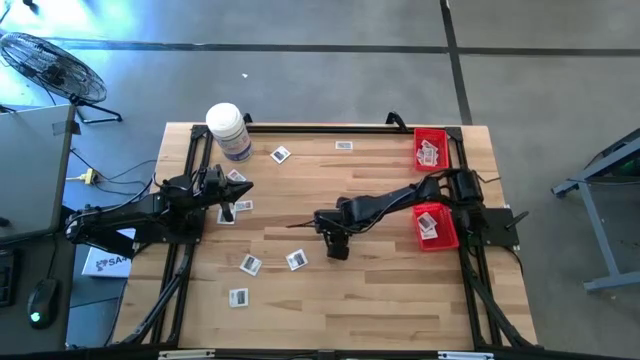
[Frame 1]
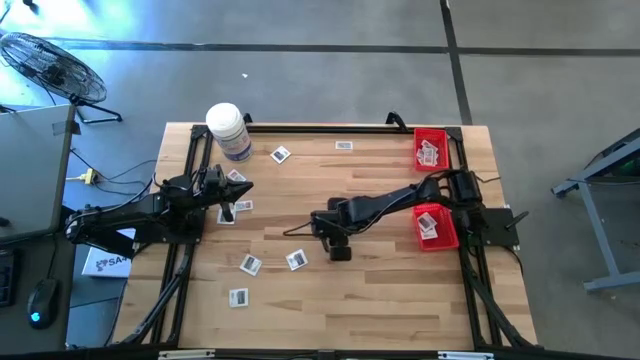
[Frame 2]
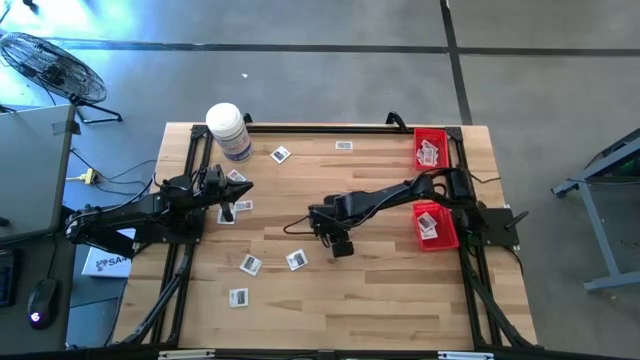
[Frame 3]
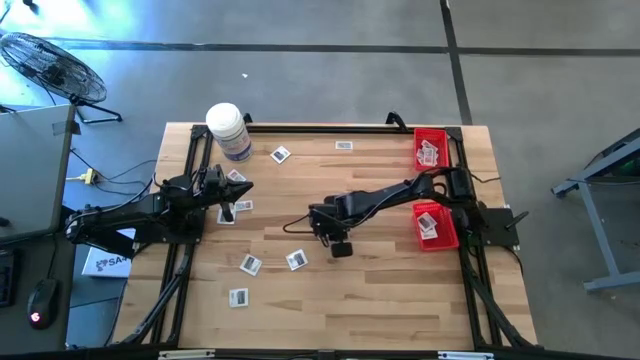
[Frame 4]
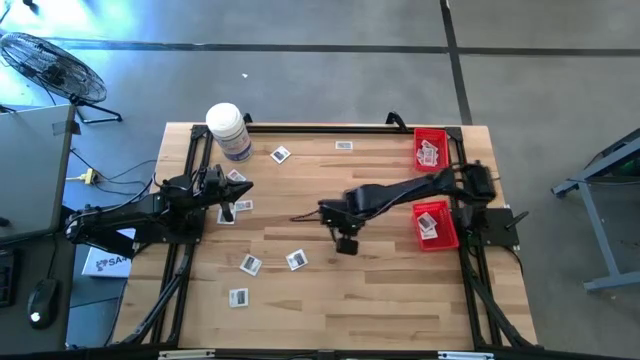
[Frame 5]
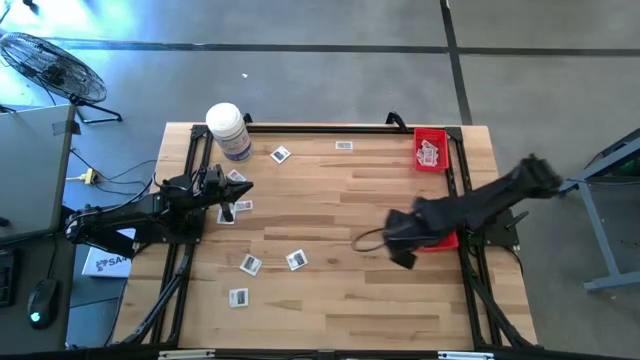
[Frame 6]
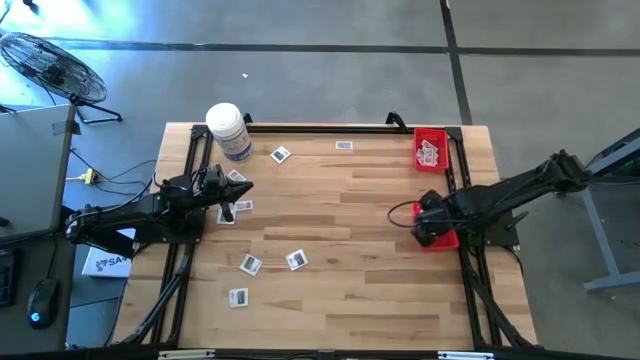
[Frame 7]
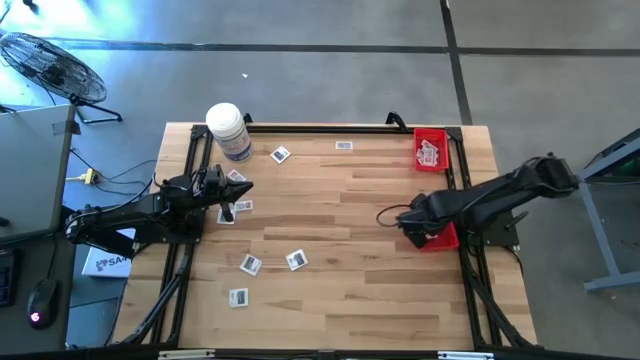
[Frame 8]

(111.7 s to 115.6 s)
Task: Pick & Place First Aid Supplies
Put the towelette pack into the bottom basket

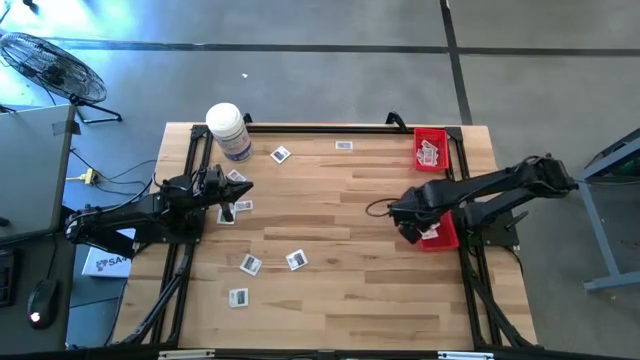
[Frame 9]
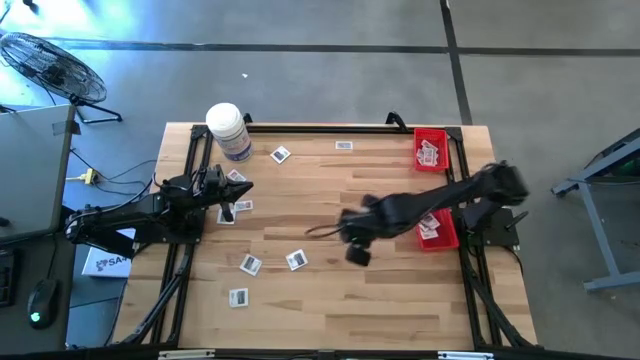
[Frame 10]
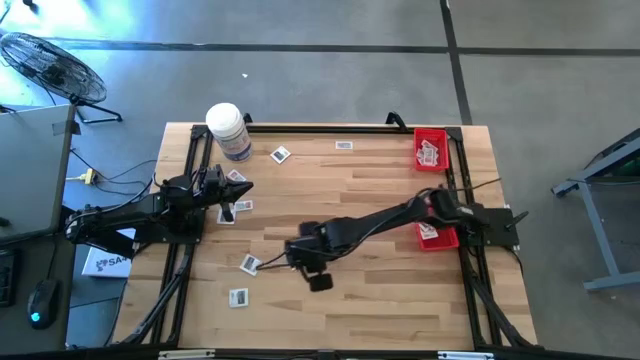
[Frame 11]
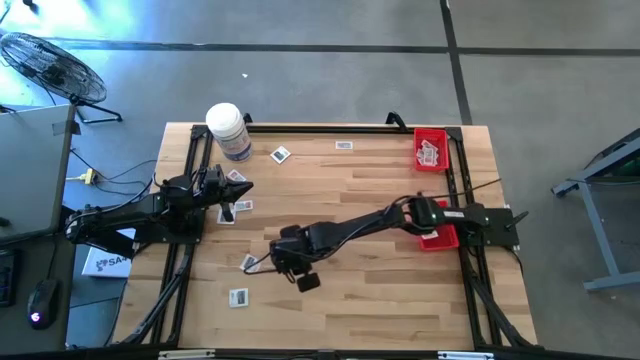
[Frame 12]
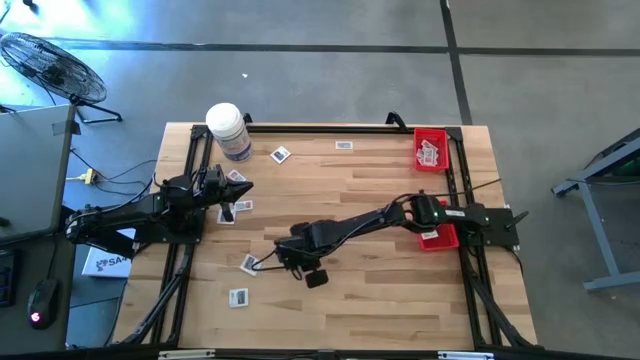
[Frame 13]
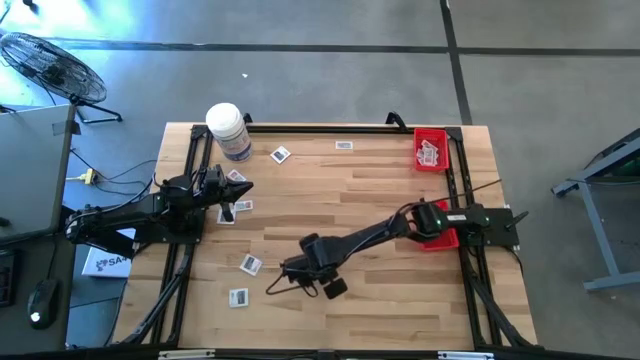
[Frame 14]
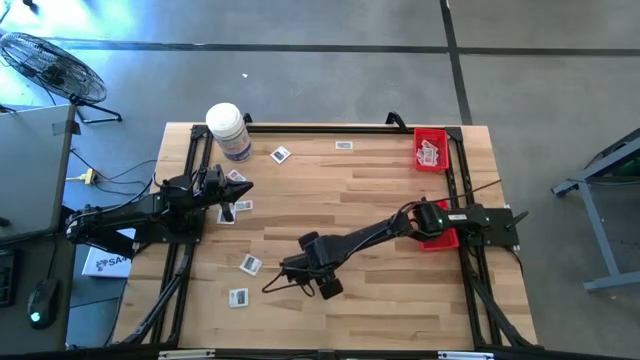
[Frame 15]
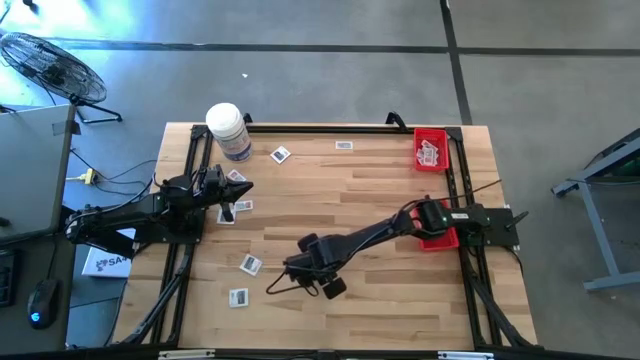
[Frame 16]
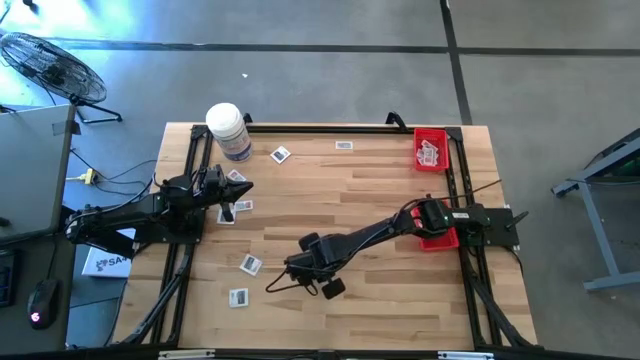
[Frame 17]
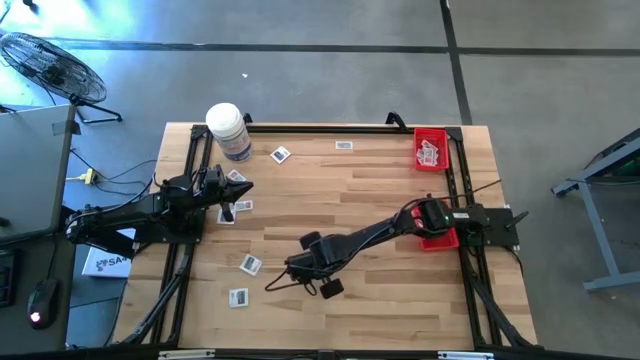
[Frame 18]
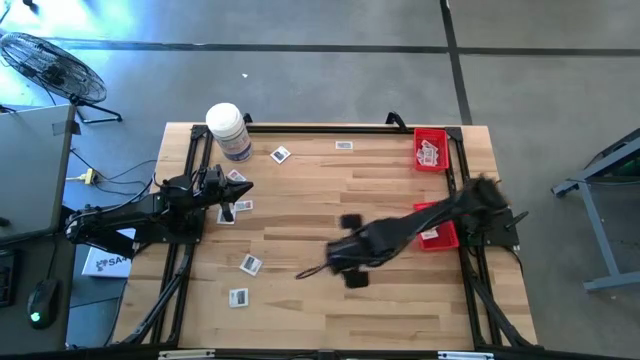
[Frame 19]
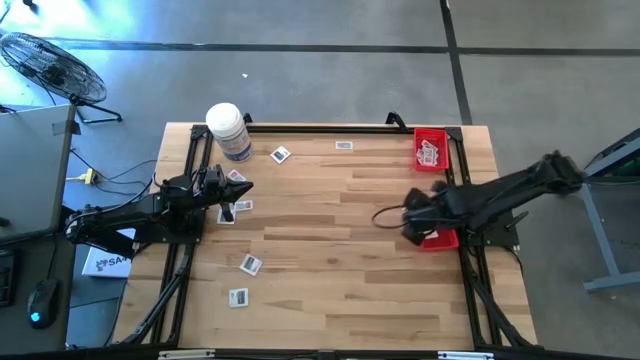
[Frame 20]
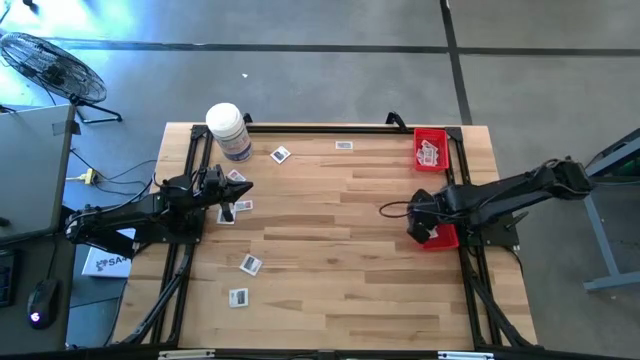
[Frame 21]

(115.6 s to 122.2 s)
Put the towelette pack into the bottom basket

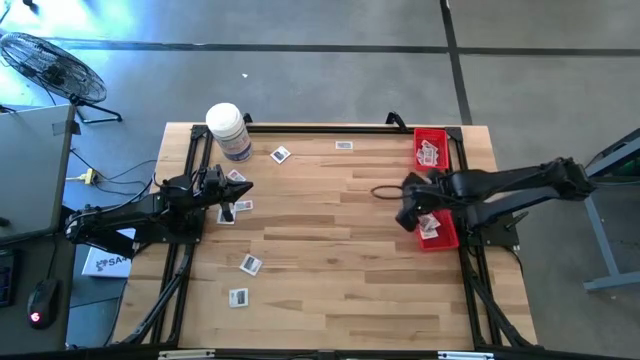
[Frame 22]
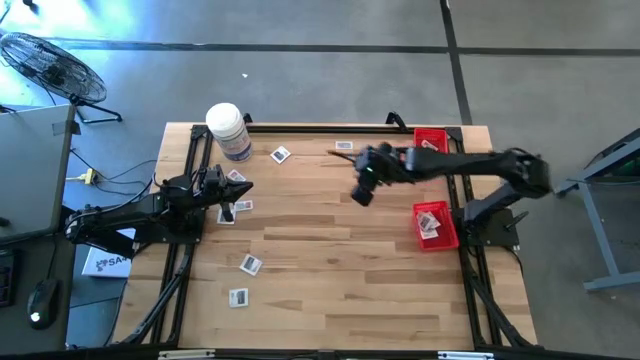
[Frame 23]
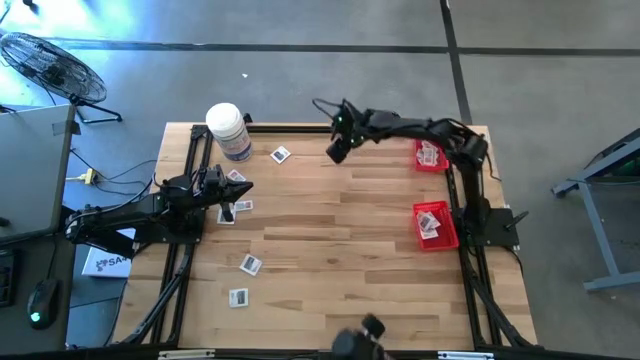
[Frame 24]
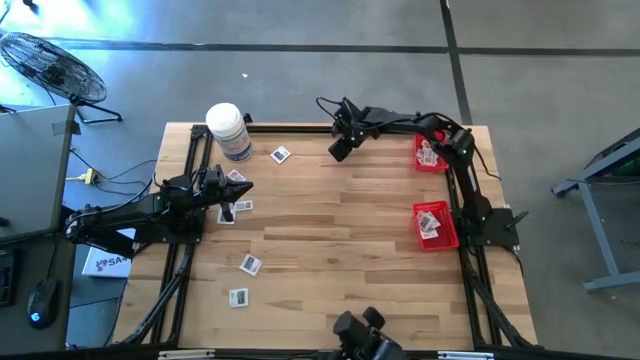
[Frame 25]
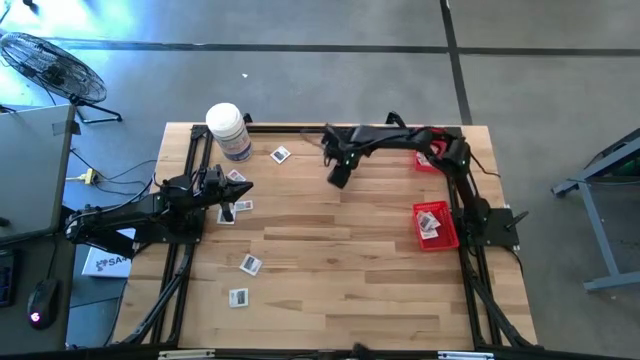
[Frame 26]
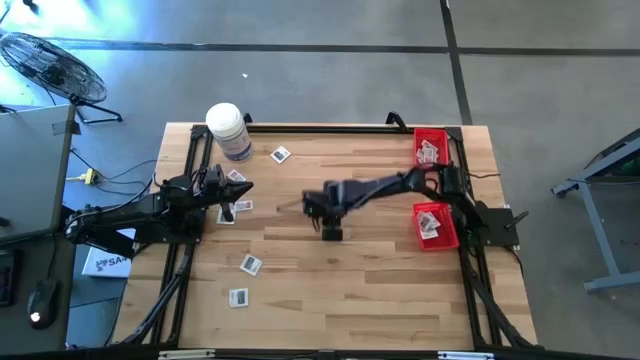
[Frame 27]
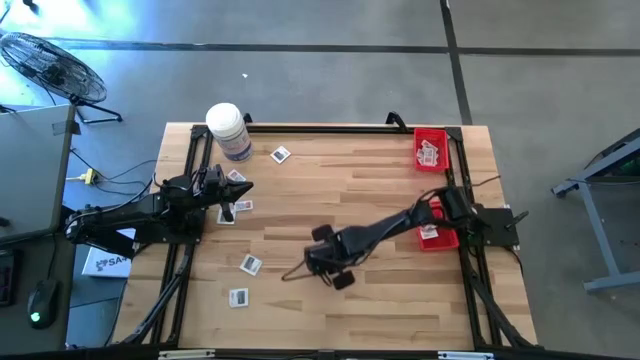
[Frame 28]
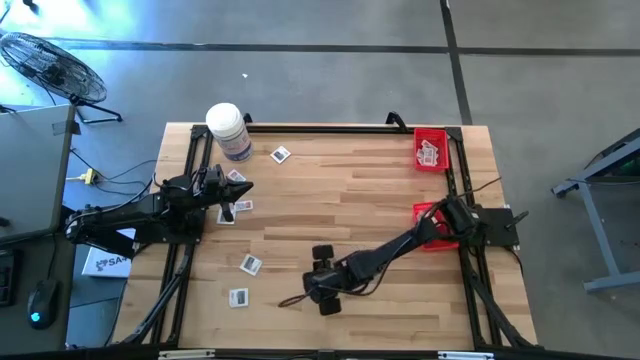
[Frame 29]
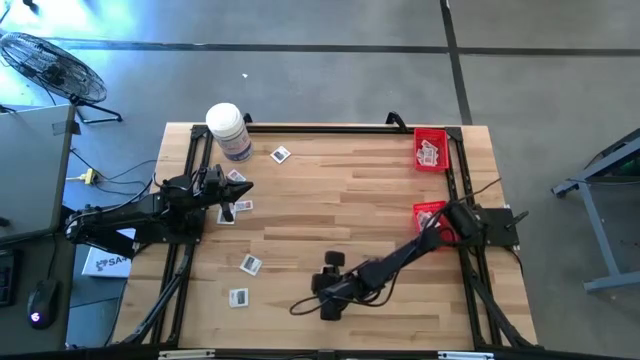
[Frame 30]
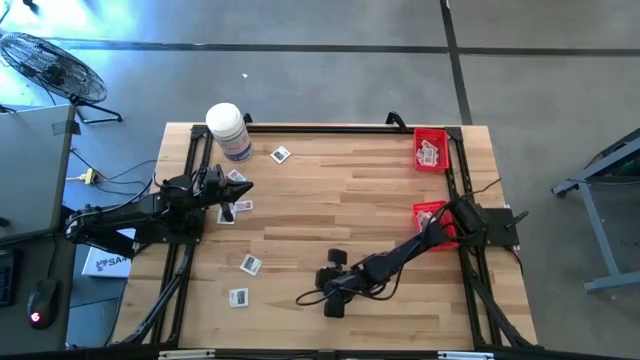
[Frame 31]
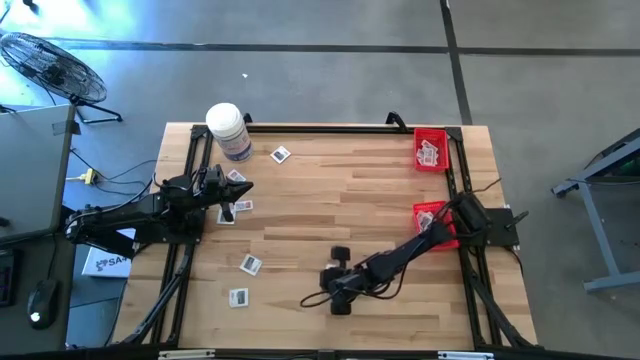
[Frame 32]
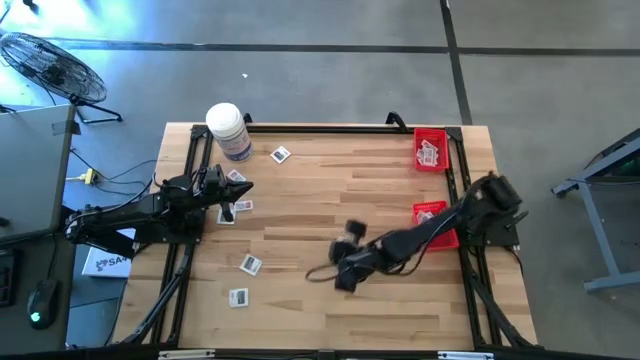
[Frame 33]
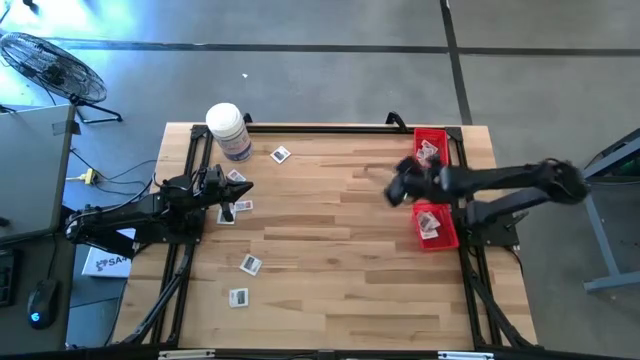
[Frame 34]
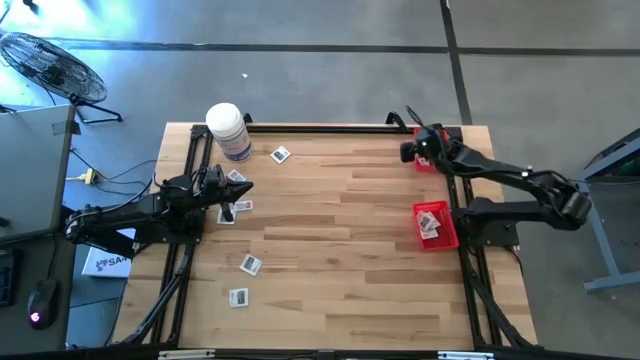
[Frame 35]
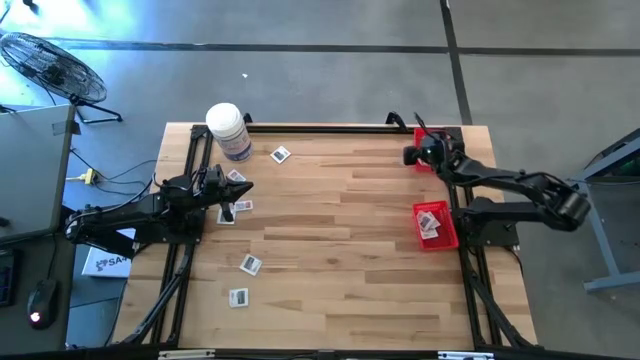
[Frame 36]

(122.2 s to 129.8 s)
Put the ointment pack into the top basket

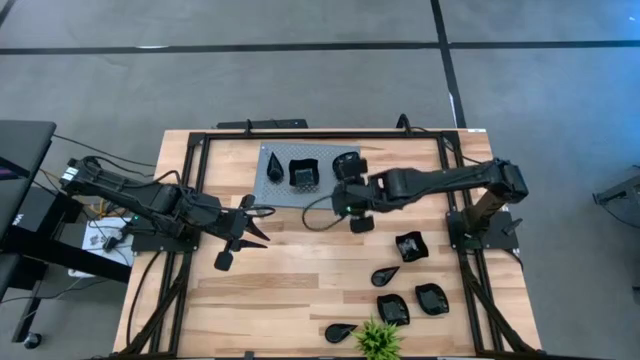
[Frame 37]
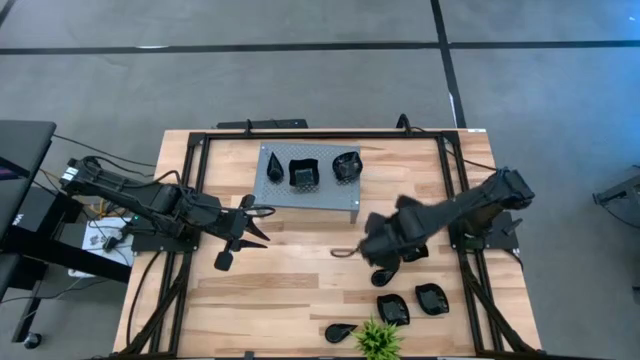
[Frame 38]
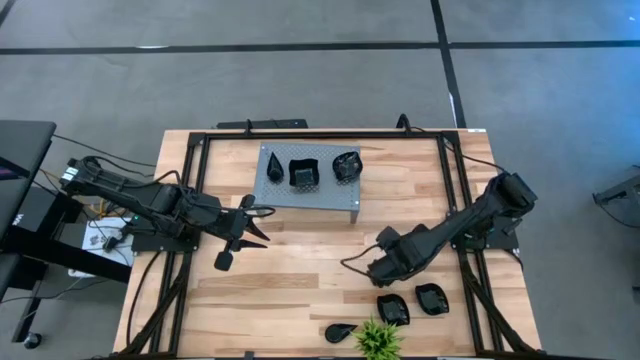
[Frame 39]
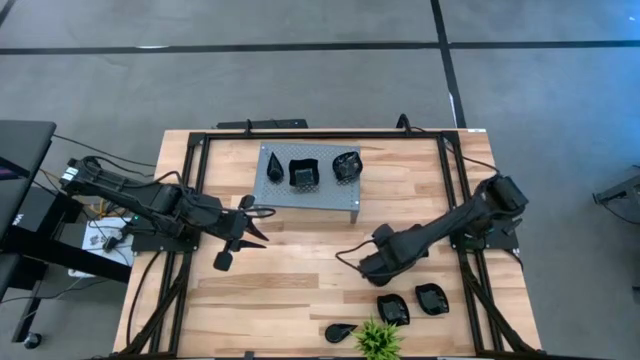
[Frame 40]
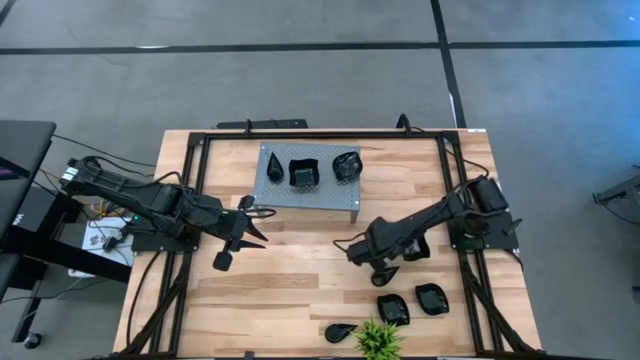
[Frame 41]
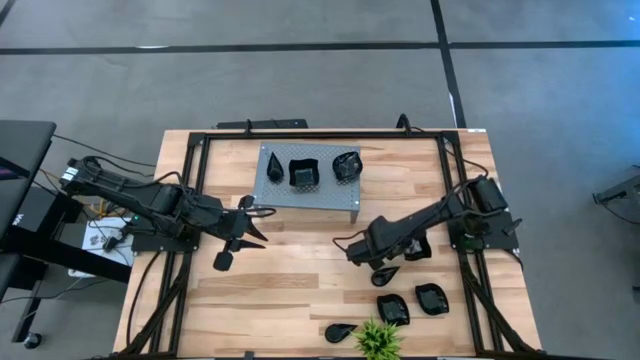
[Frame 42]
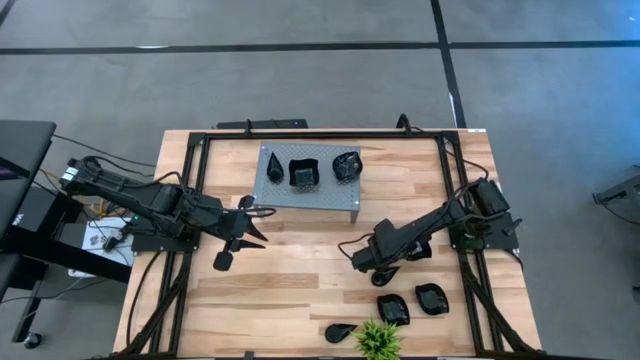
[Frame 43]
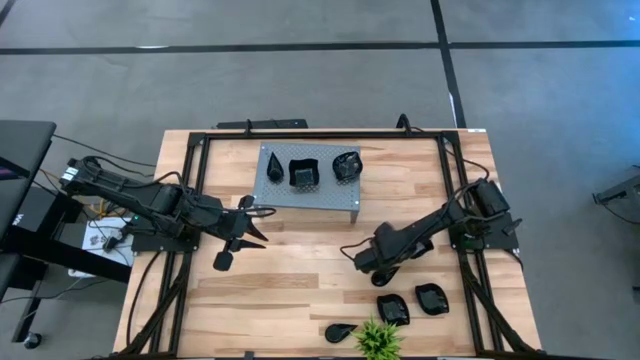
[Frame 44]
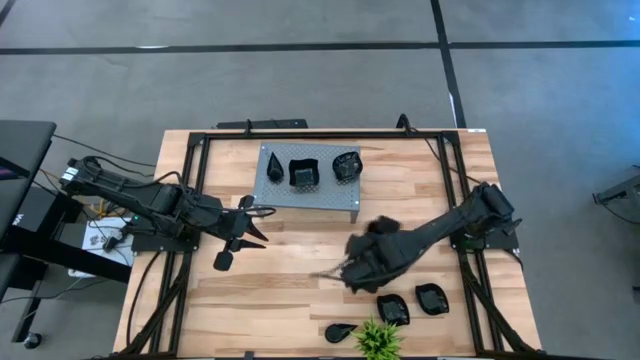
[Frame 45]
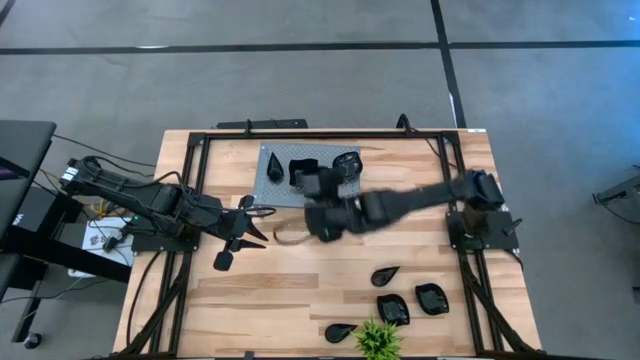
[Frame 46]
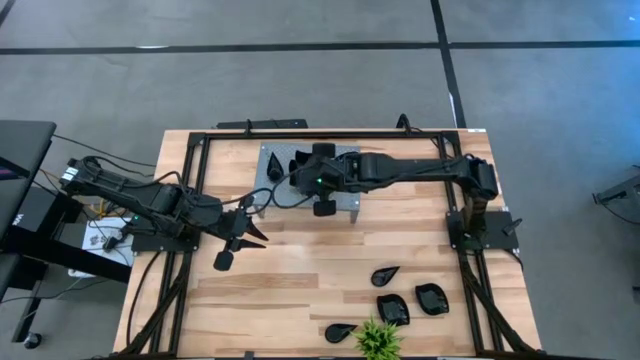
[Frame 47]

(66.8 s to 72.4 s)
Task: Pick & Place Mini shaped plates
Stack the black distorted square plate on top of the black distorted square plate on the shelf
